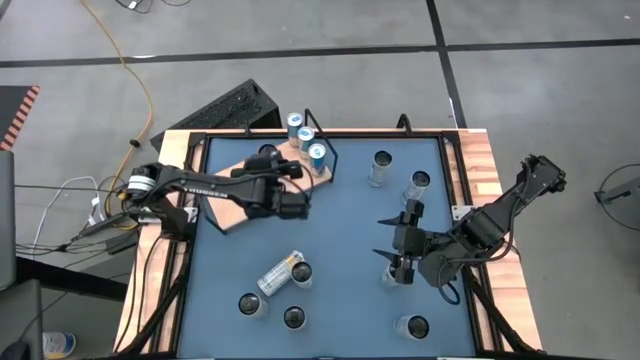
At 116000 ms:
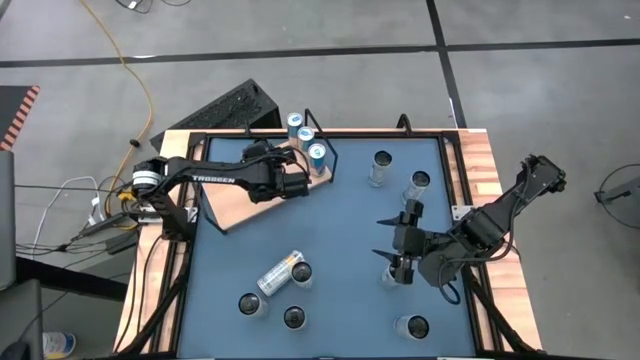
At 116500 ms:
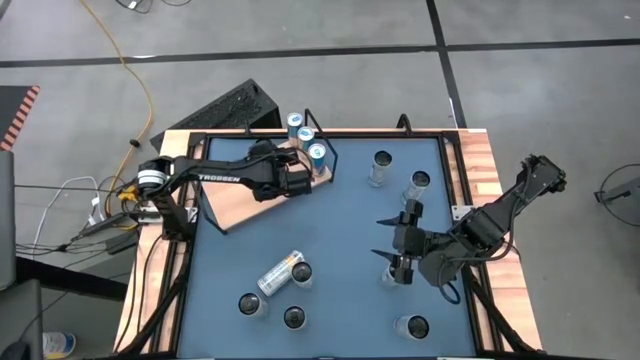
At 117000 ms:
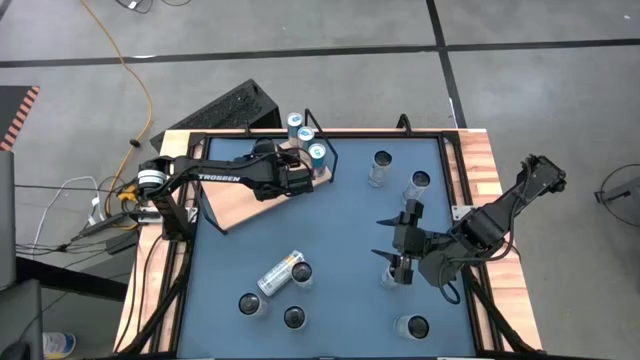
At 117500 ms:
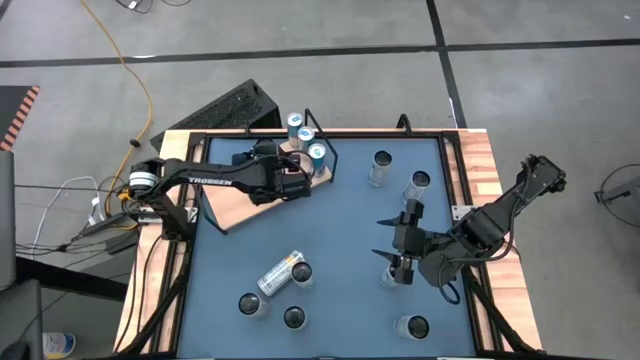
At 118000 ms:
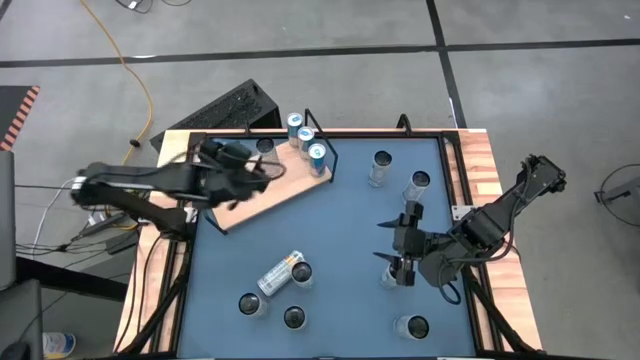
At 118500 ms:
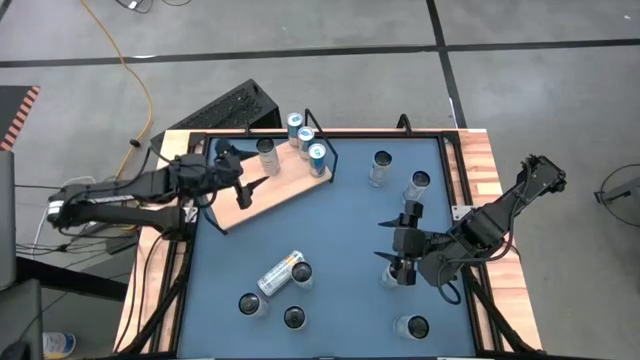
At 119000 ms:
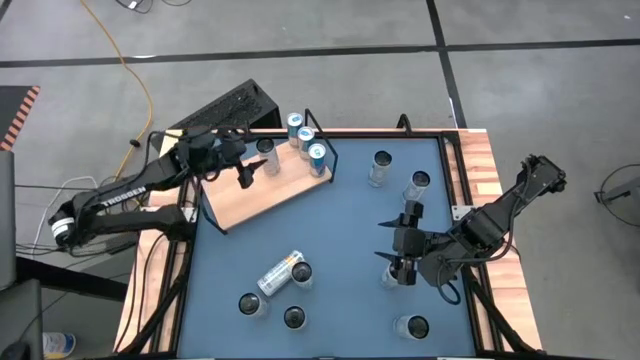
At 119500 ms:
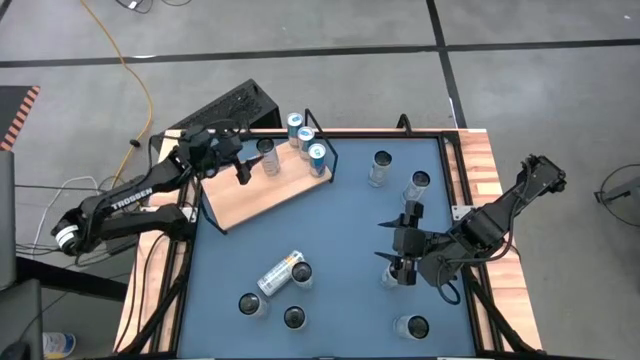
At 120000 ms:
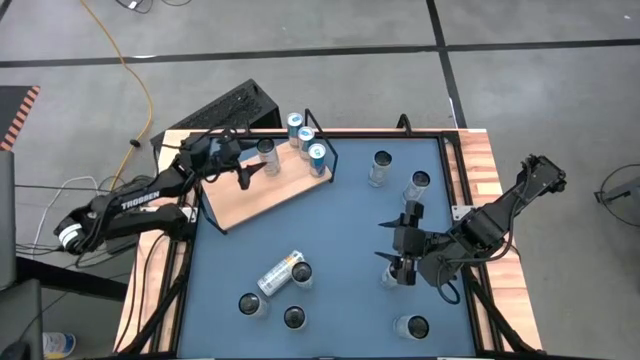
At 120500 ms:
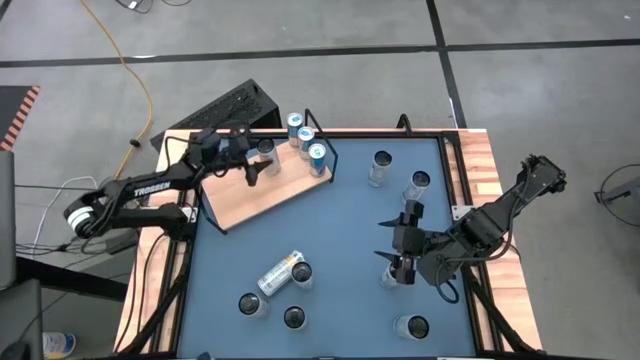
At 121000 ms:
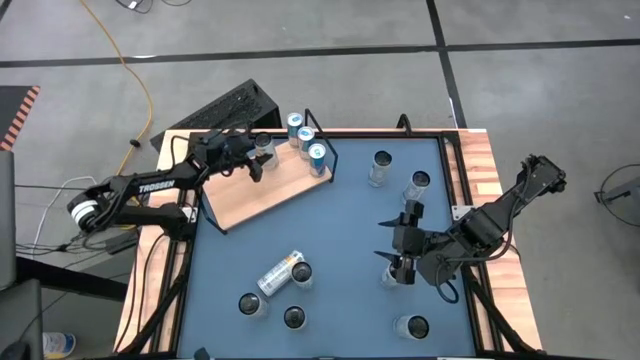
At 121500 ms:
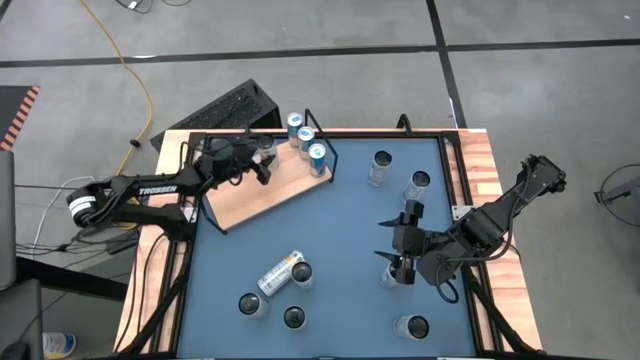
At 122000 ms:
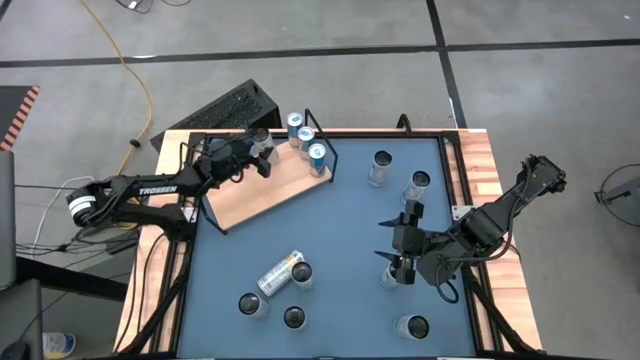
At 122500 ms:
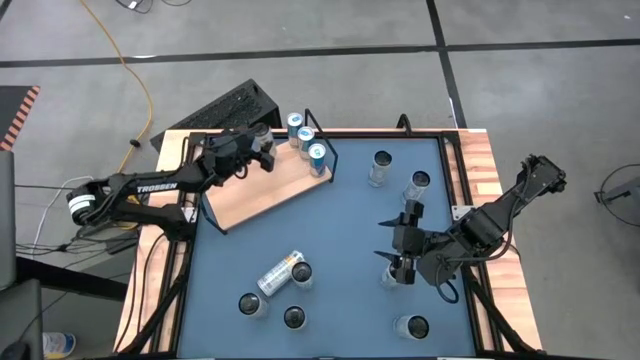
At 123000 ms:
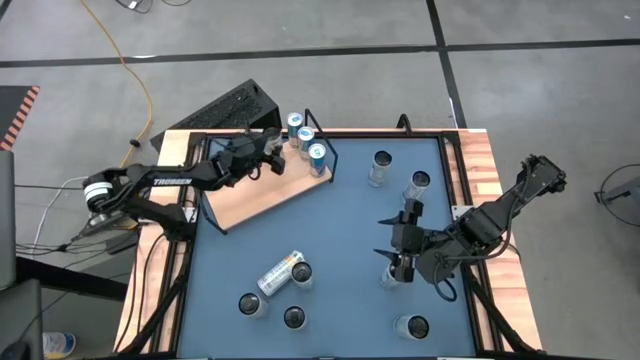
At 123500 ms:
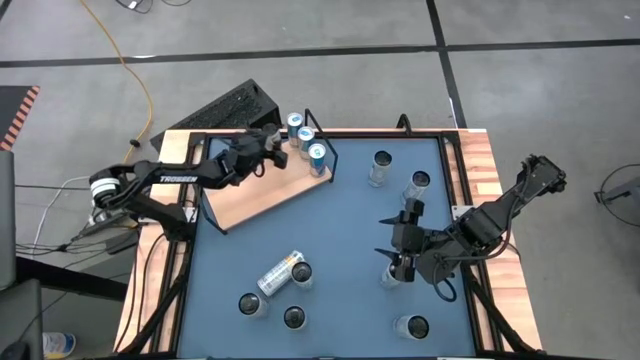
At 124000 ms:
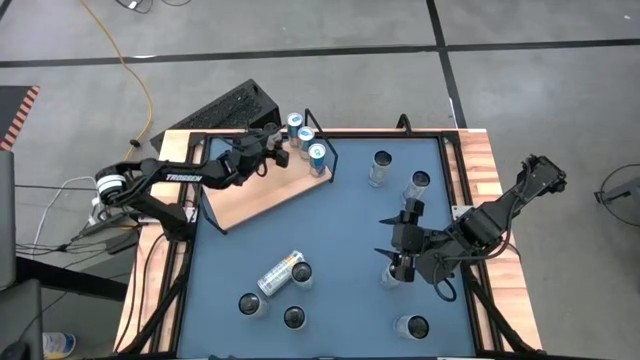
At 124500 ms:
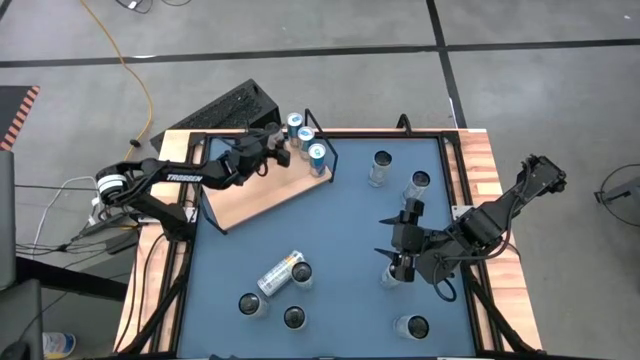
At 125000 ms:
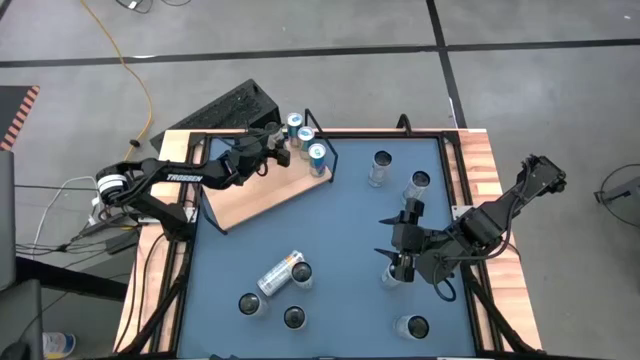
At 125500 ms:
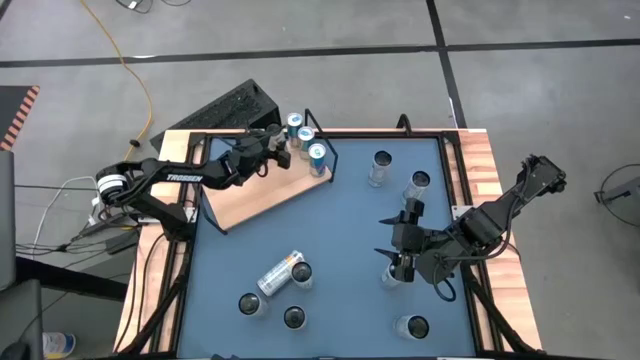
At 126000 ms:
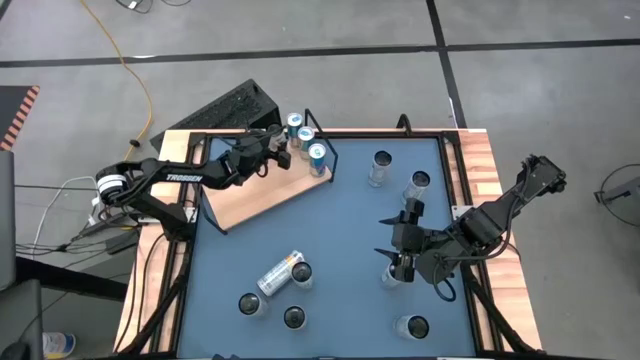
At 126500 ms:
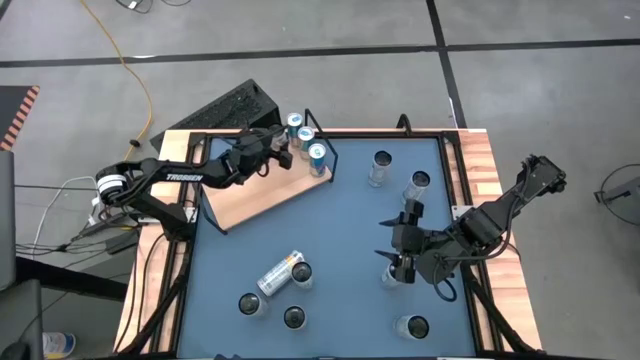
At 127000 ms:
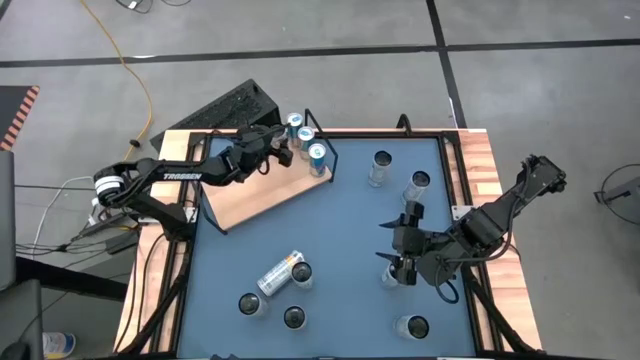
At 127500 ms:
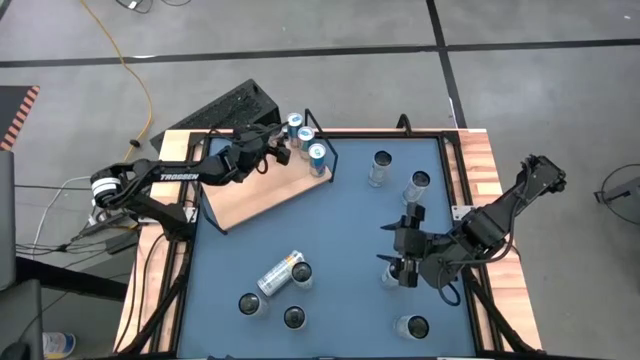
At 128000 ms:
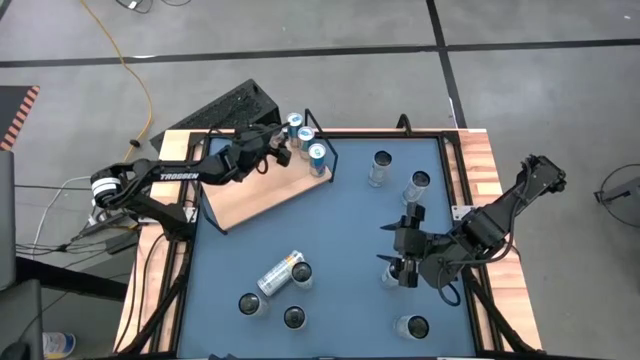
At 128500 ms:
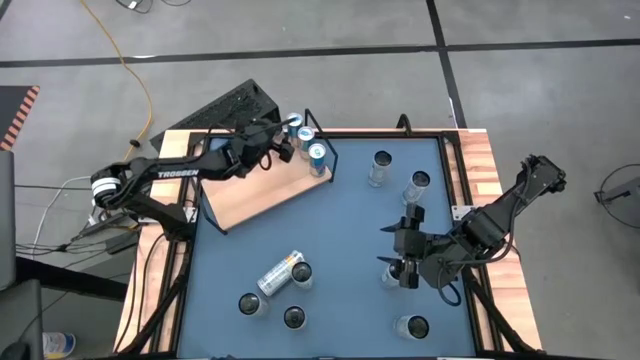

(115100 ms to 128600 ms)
Task: Place canned beverage on shelf
Put the top right white and yellow soda can on the shelf

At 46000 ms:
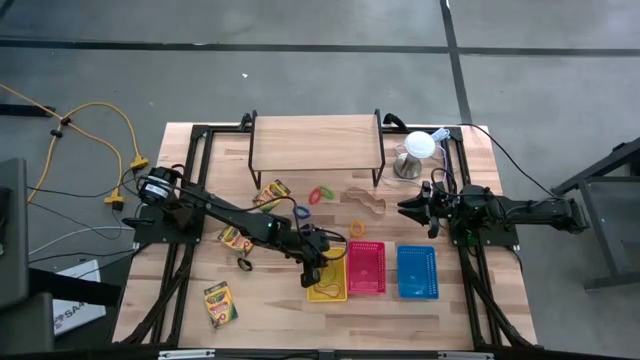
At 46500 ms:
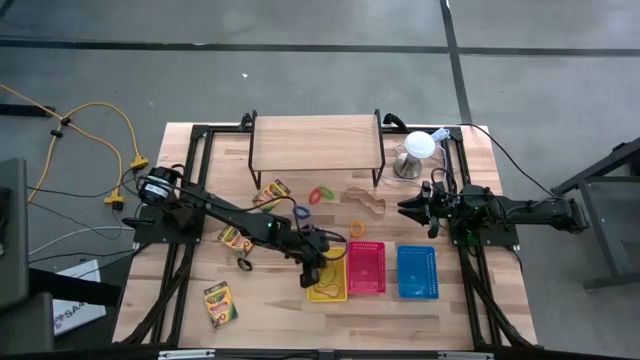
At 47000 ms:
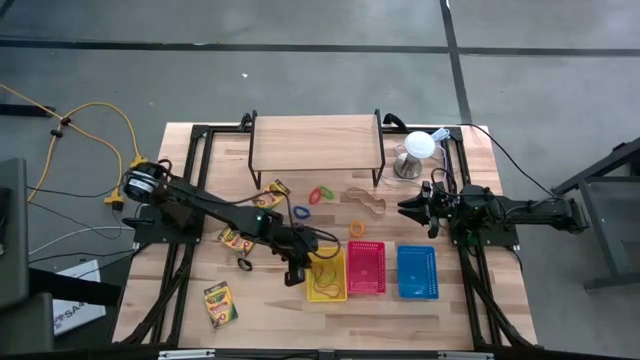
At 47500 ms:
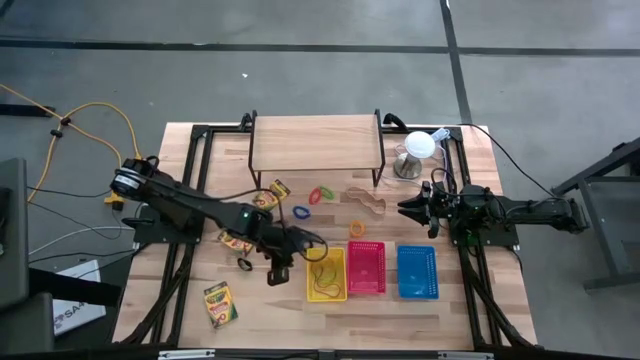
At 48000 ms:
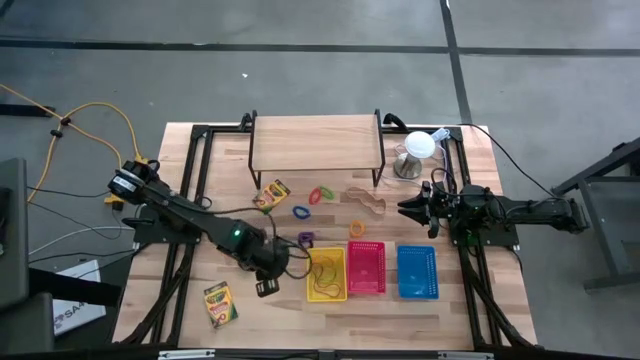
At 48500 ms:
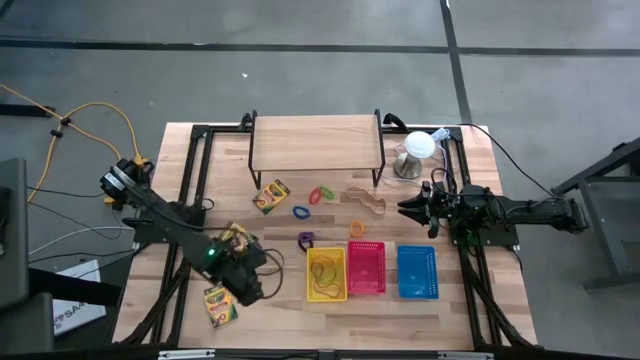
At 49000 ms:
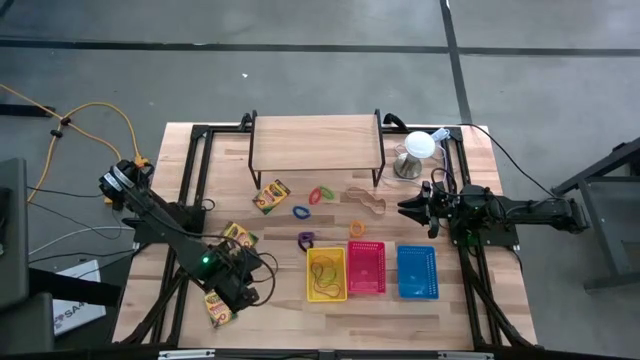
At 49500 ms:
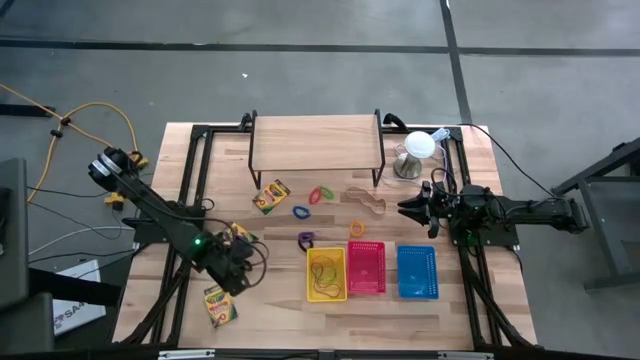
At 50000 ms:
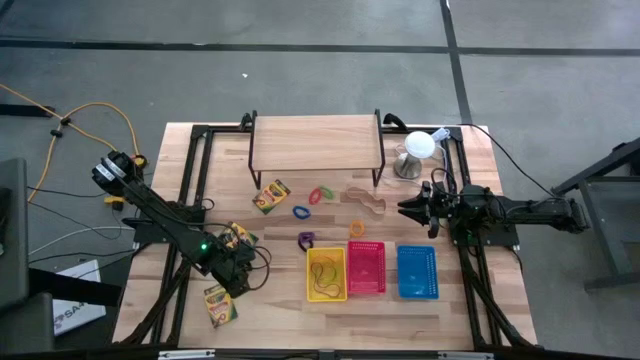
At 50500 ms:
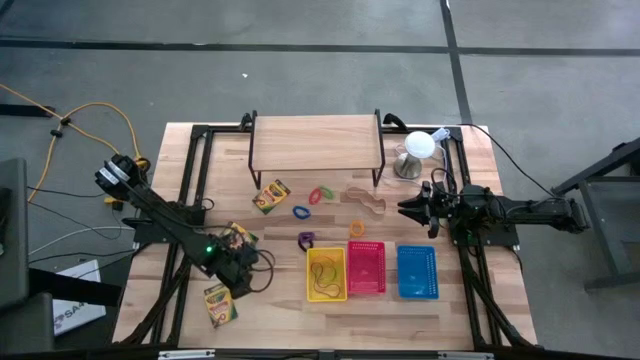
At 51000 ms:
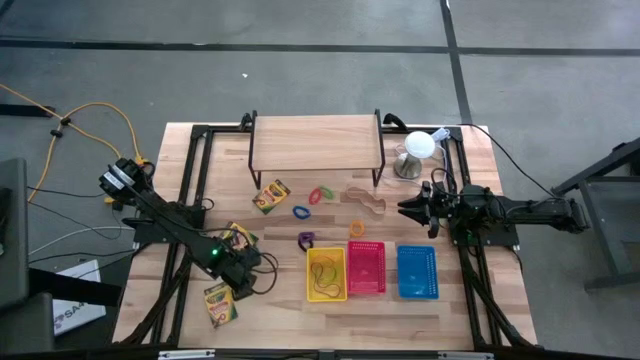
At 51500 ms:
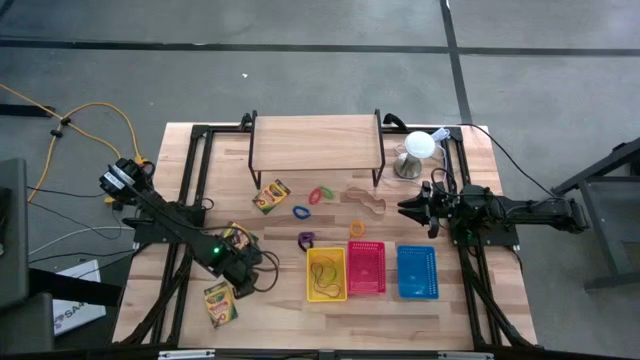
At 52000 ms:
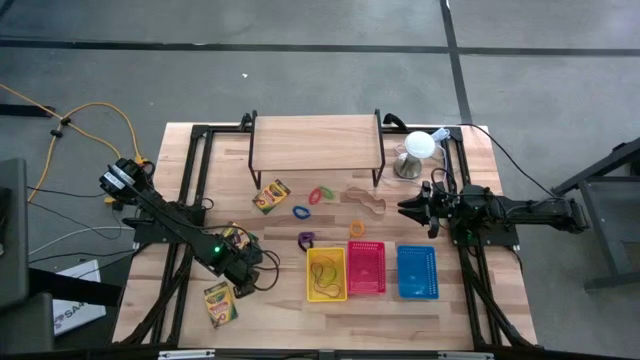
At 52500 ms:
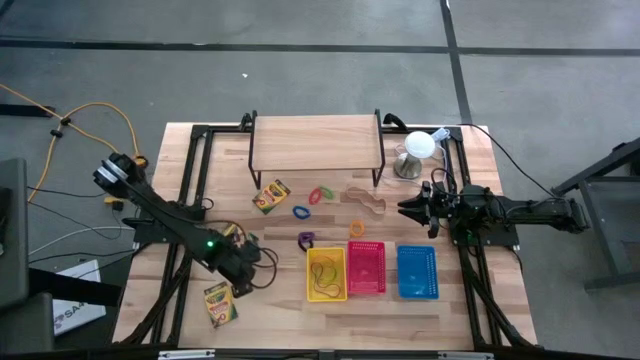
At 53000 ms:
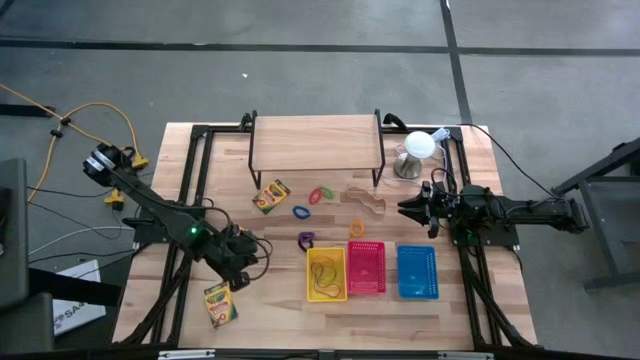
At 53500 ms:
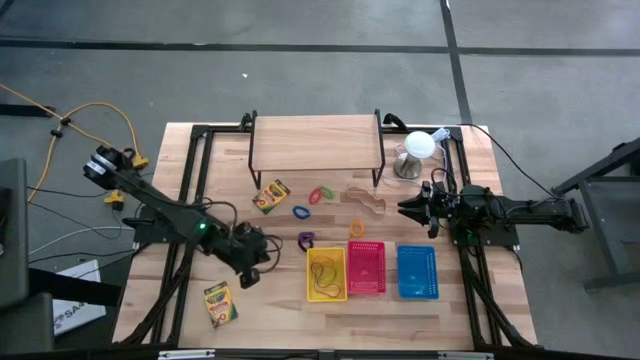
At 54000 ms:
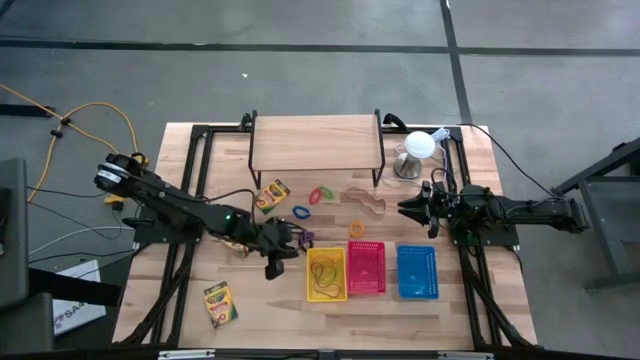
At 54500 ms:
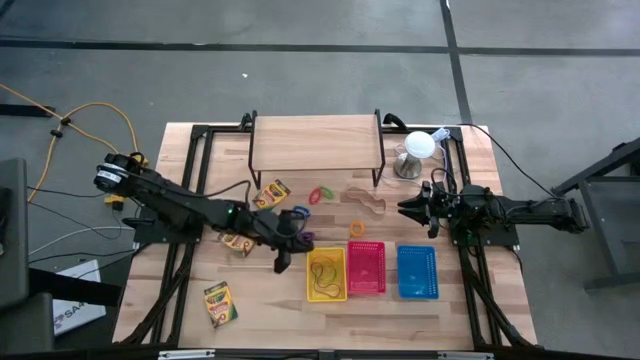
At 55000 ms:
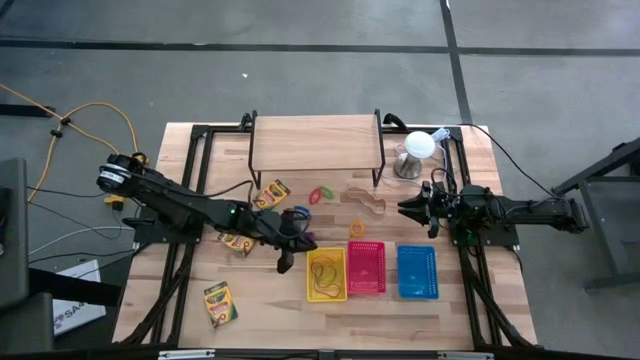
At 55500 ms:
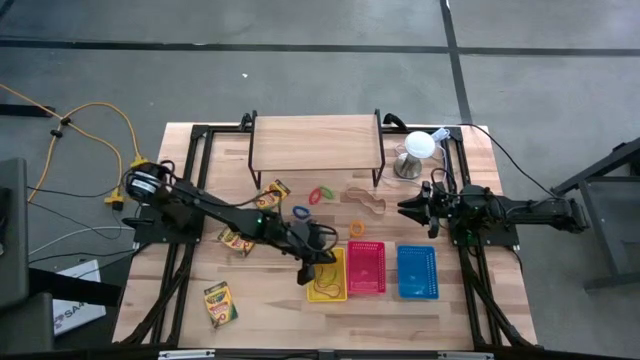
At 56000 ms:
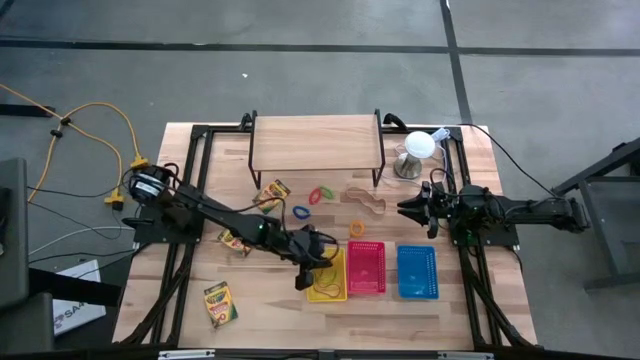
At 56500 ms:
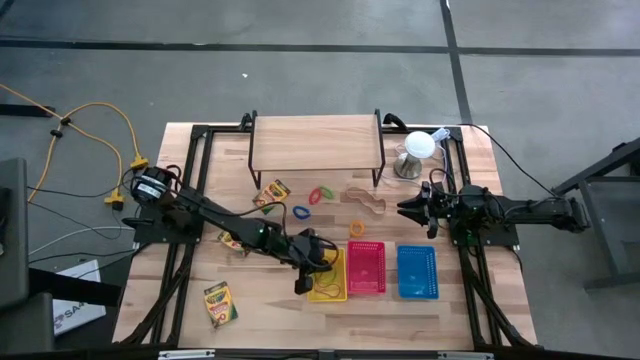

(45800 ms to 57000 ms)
Task: Pick & Place Office Desk Supplies
Put the black rubber band into the yellow bin
